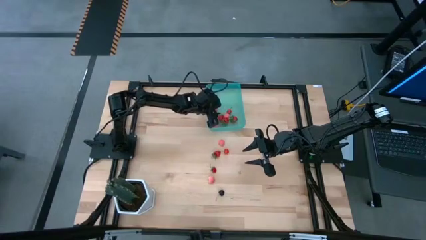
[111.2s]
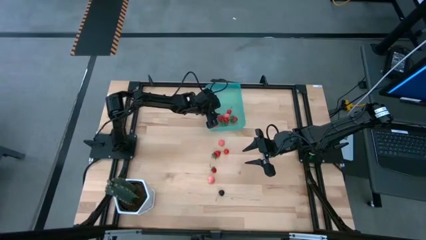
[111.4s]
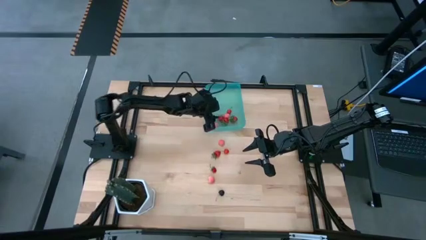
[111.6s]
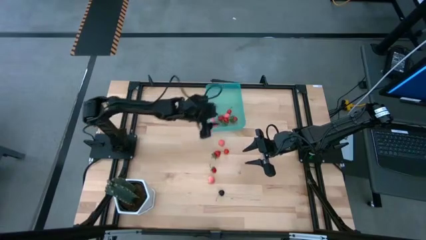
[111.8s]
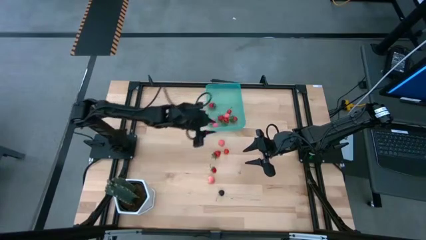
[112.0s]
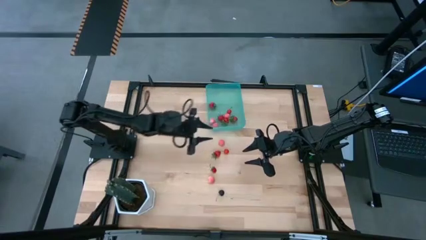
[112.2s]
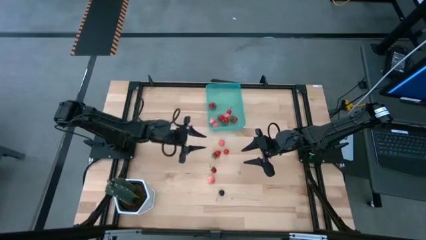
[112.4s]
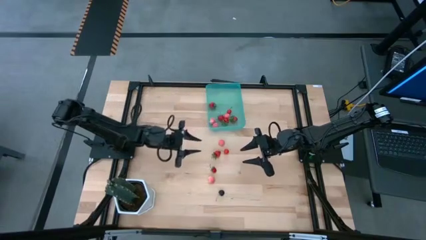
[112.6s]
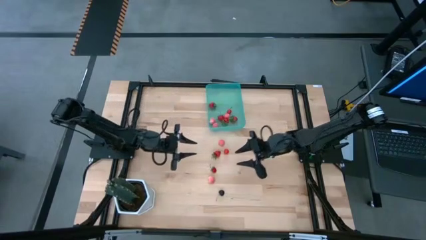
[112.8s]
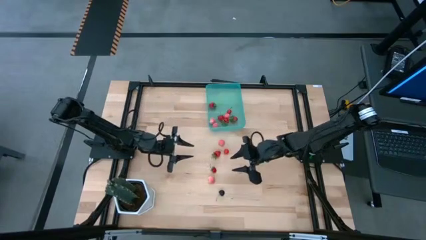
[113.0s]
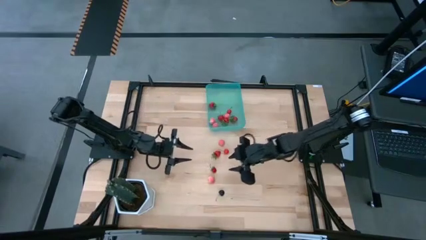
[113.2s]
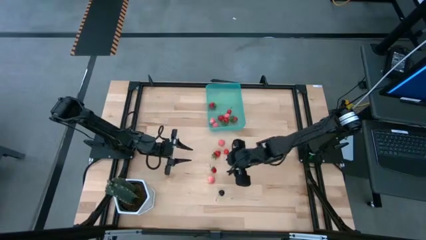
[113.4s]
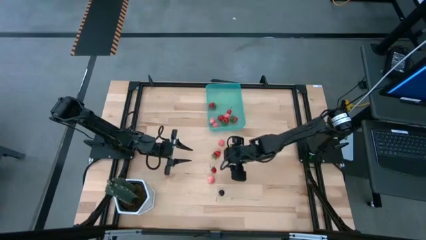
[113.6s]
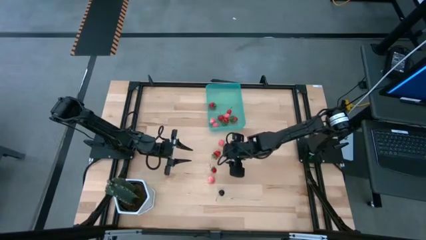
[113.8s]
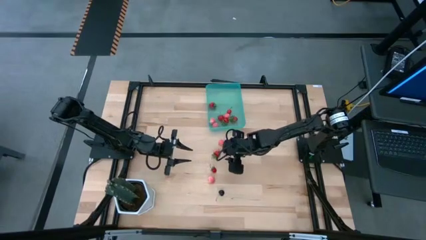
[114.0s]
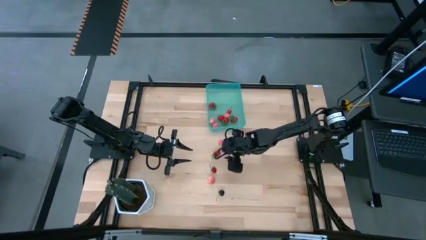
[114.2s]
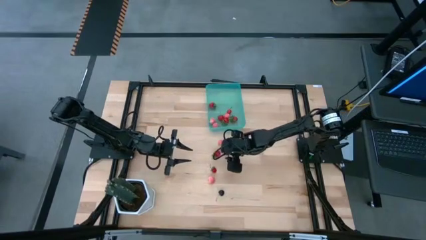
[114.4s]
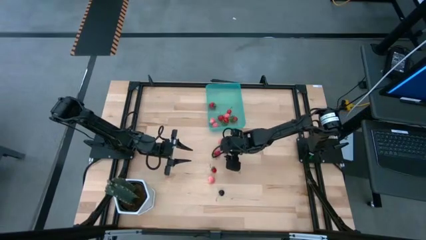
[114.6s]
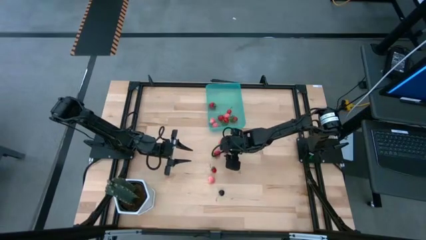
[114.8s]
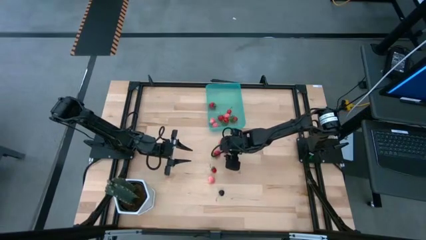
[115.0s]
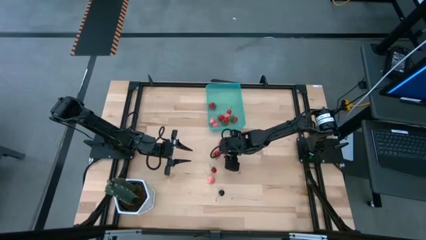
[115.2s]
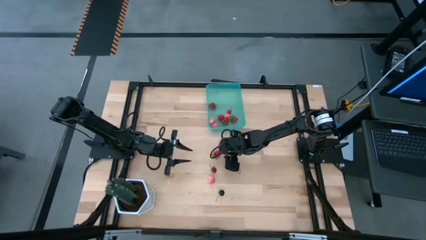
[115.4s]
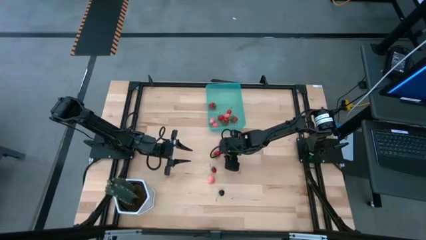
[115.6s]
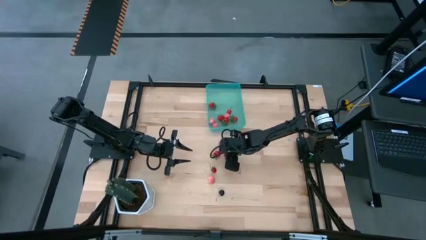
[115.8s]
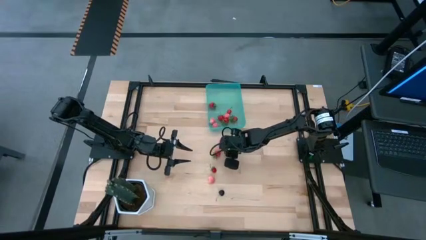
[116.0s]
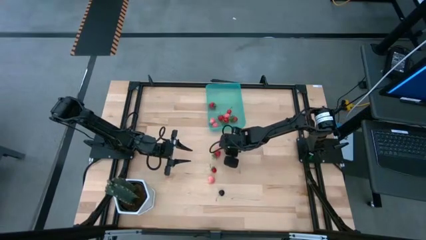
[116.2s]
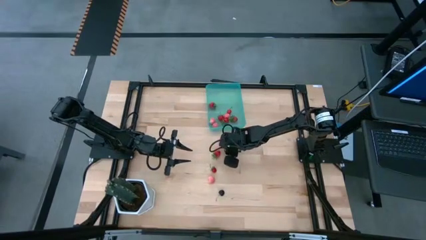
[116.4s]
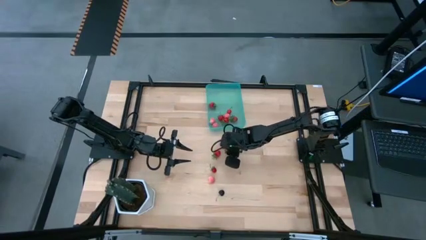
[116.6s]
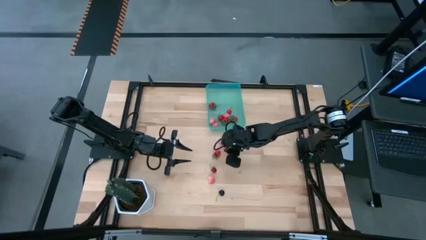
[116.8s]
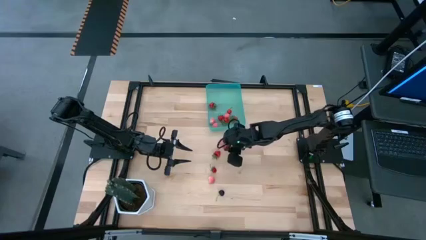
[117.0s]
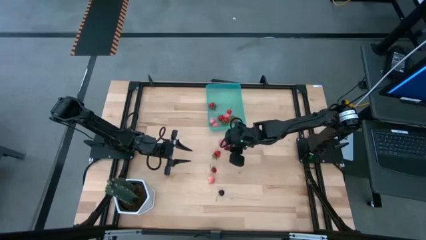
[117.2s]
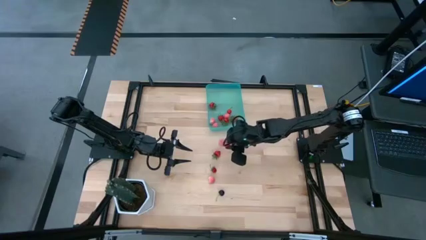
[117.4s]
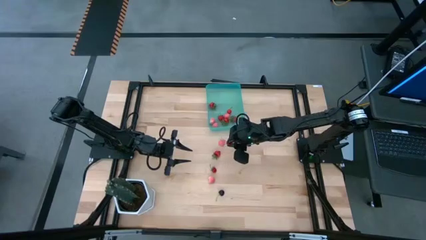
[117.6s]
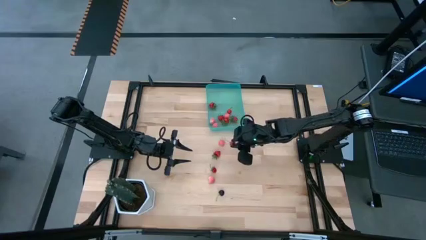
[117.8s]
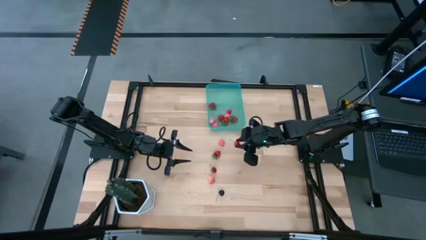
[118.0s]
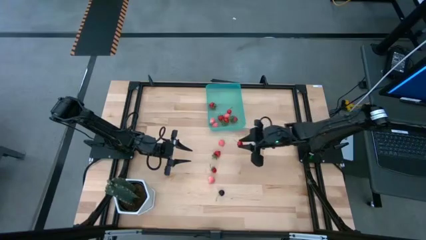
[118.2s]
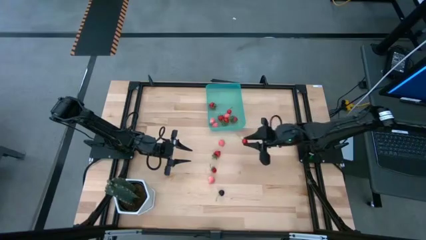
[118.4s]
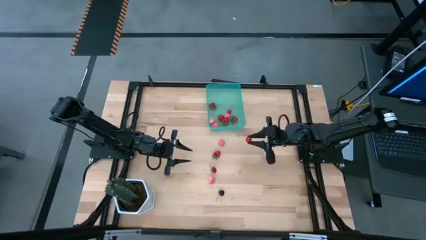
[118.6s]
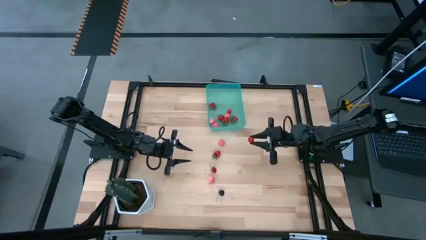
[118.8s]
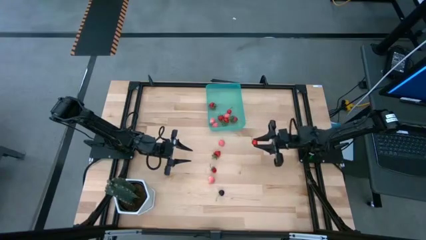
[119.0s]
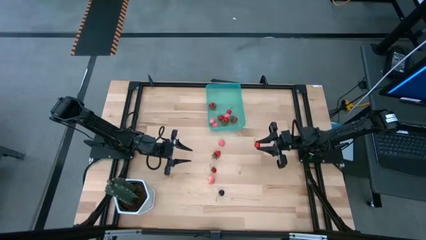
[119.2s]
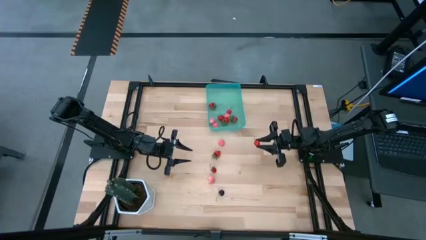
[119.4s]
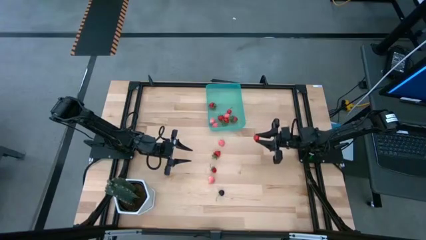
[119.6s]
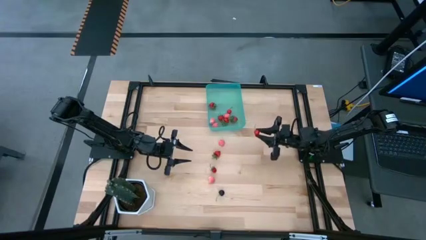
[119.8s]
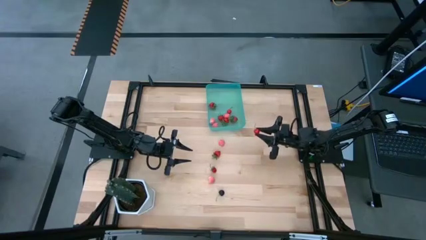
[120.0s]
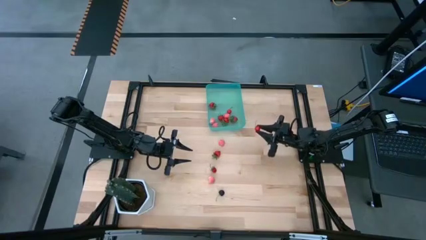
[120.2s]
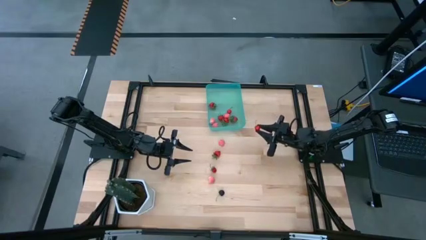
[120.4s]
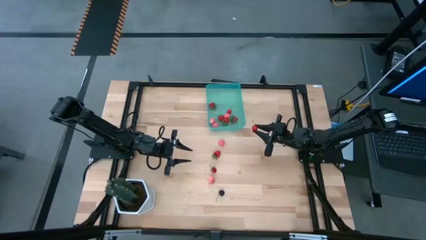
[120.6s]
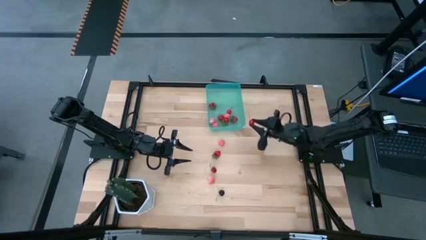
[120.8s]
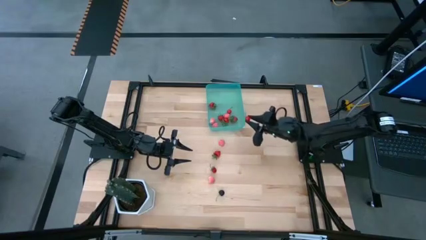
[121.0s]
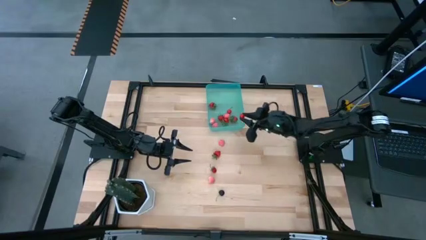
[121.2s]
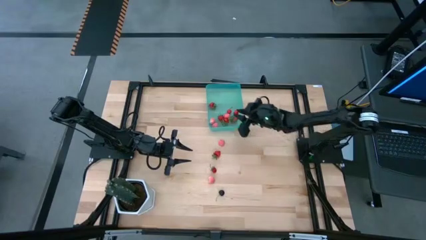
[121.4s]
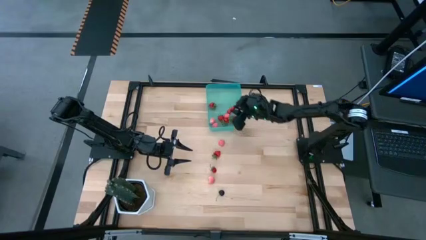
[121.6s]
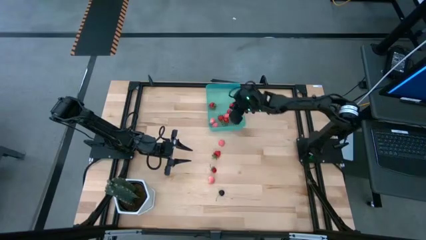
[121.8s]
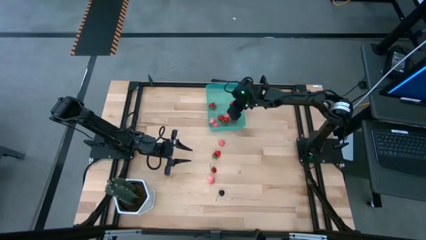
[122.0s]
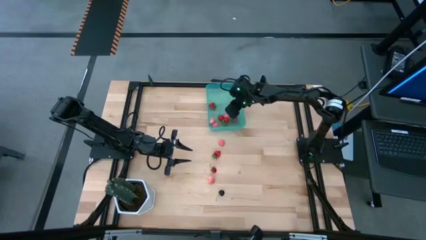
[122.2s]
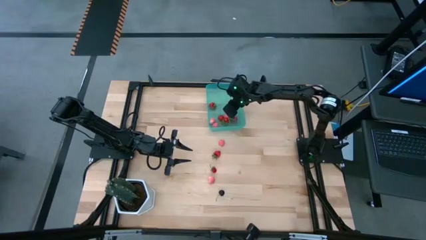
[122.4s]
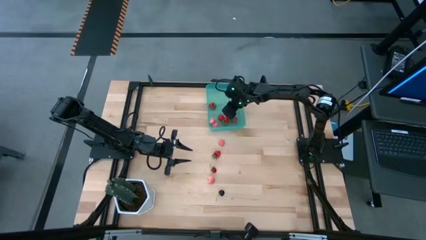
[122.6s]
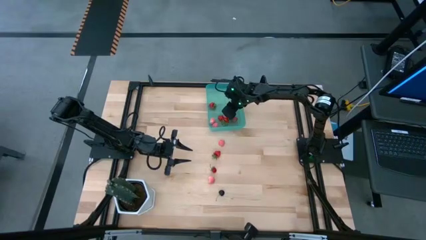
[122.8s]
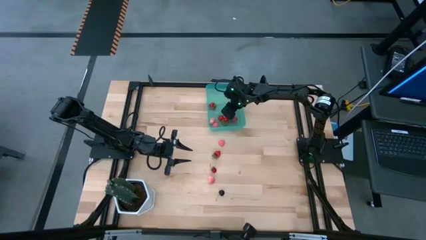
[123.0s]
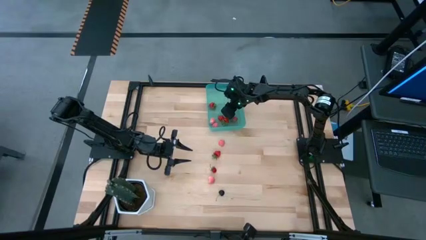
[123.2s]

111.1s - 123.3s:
Task: Pick and placing Produce into tupperware
Put the red cherry into the blue bin

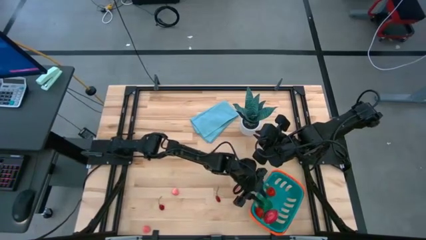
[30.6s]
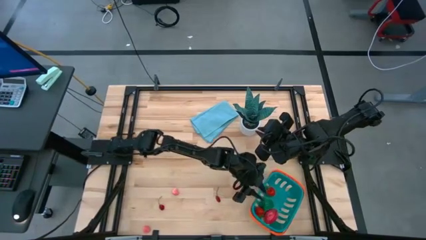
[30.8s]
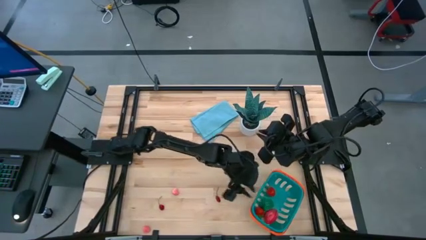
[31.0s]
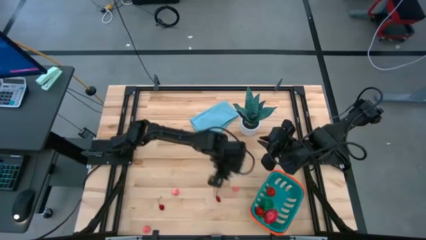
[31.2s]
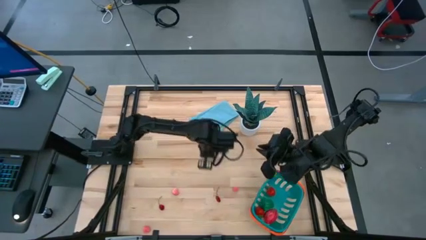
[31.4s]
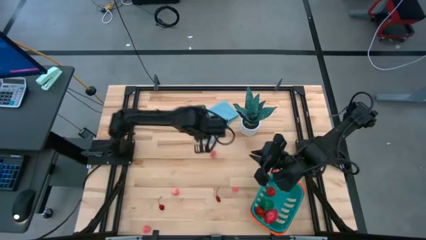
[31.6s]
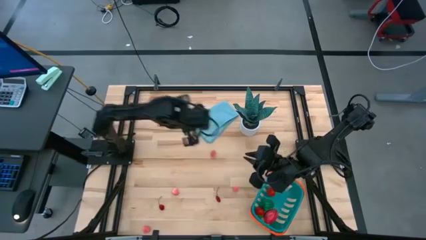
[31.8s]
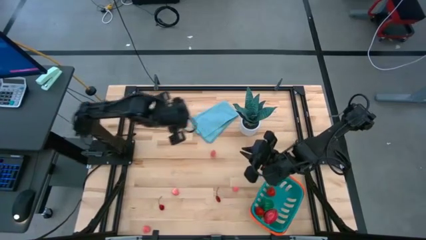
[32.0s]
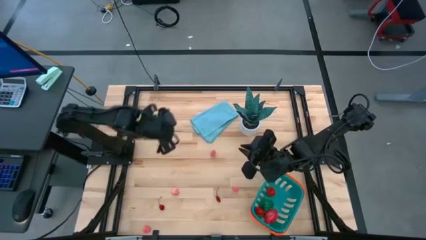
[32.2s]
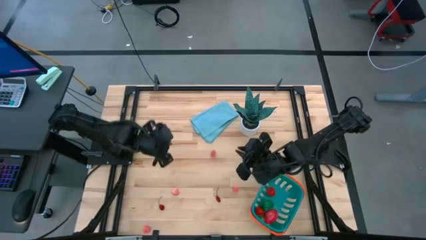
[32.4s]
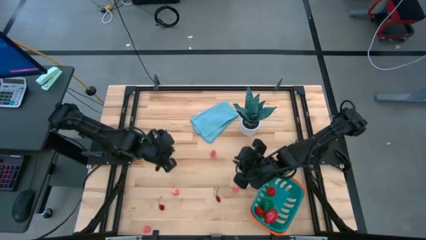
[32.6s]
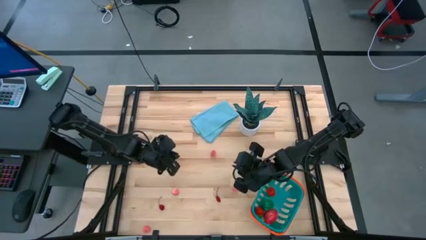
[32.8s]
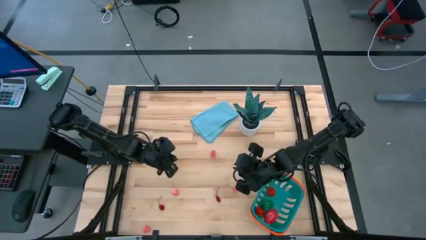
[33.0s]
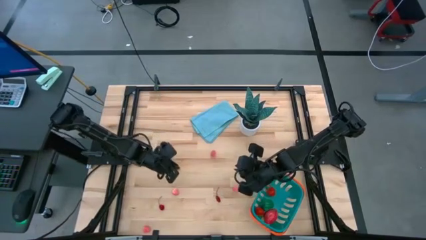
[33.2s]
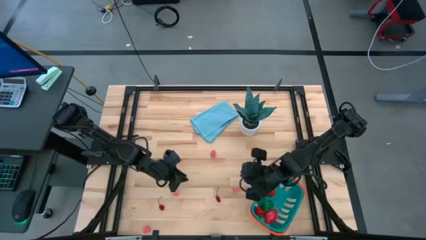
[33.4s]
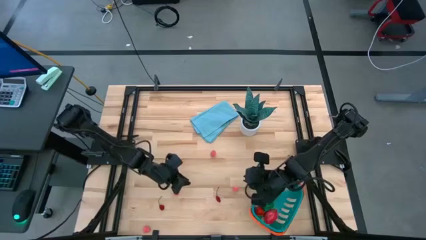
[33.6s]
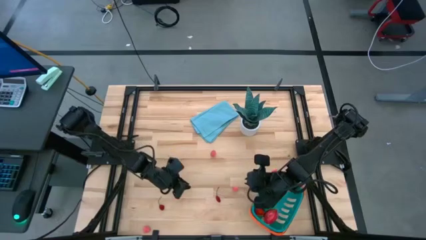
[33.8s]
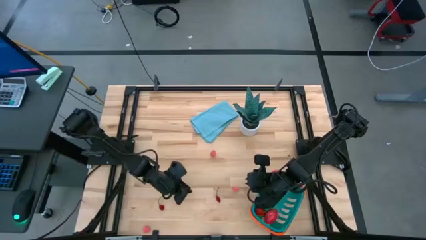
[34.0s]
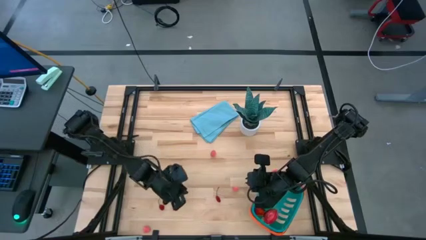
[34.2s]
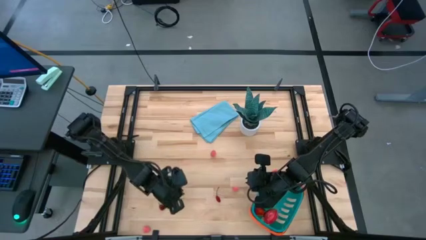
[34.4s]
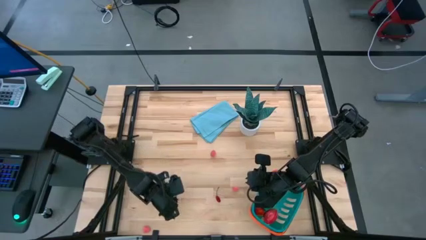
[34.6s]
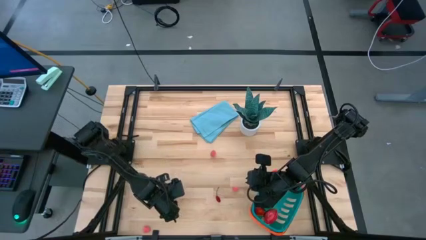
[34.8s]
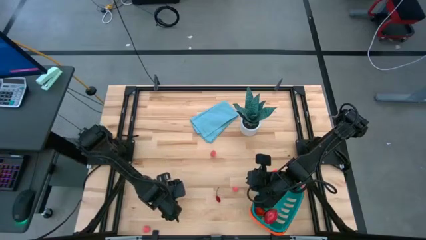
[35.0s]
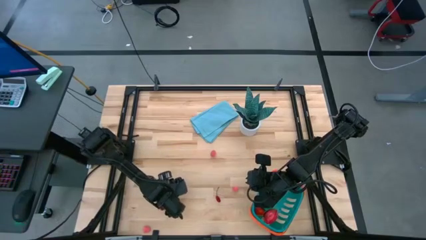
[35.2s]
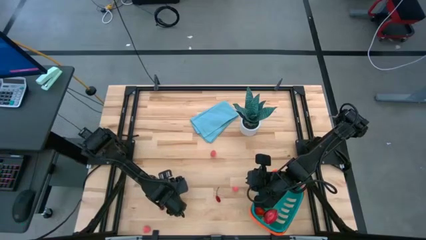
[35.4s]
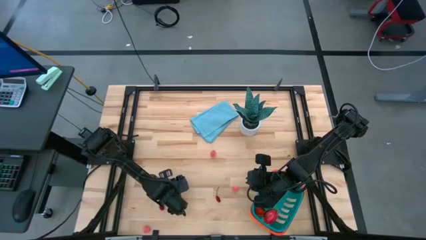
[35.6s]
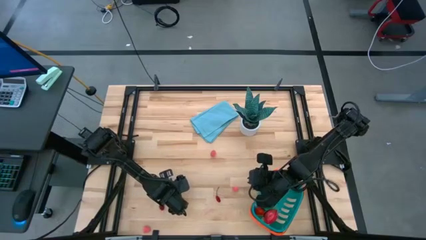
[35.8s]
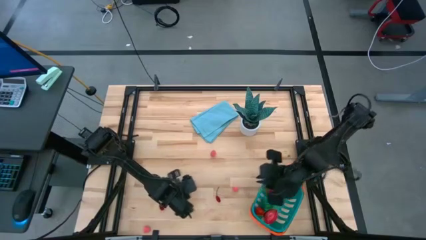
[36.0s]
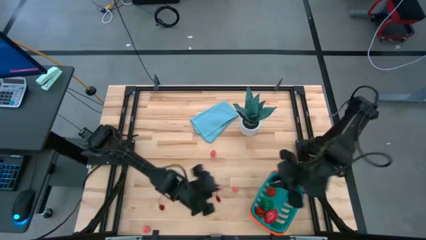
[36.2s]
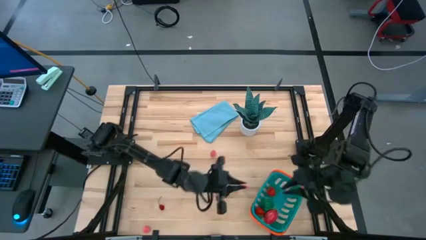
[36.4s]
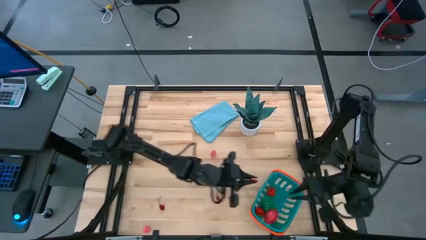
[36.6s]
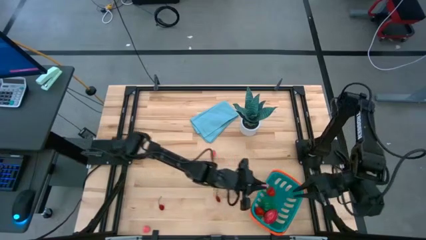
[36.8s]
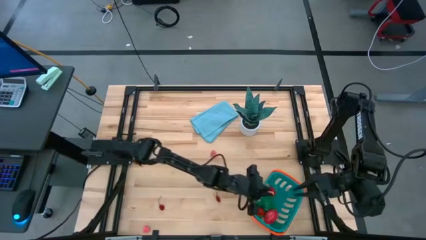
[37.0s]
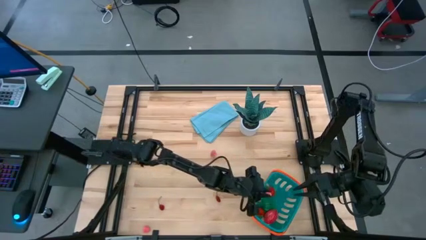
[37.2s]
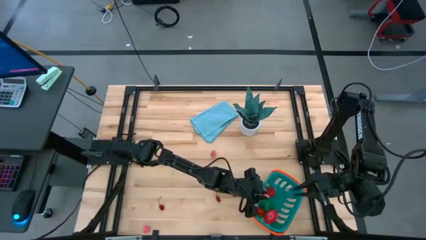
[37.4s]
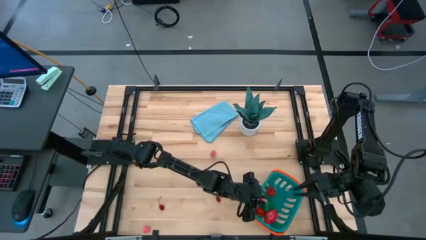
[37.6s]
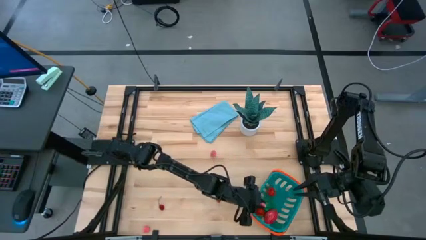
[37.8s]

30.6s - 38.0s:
Task: Pick and placing Produce into tupperware
Put the middle left apricot into the basket
